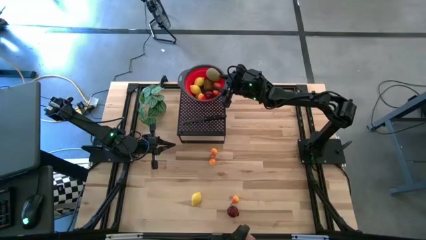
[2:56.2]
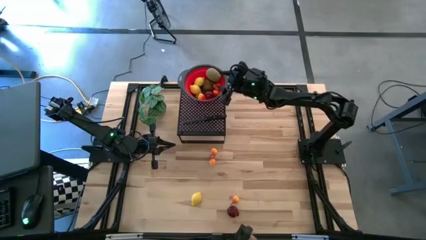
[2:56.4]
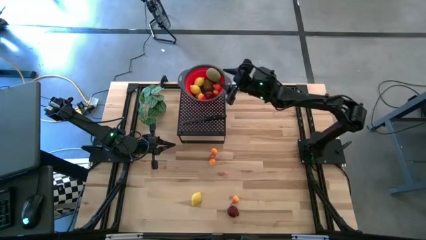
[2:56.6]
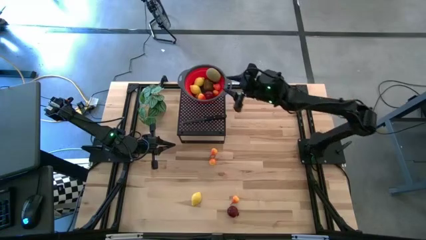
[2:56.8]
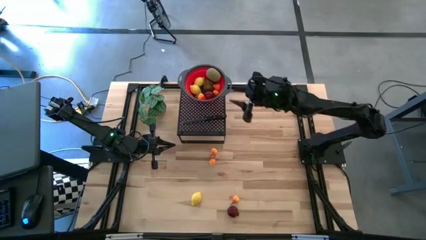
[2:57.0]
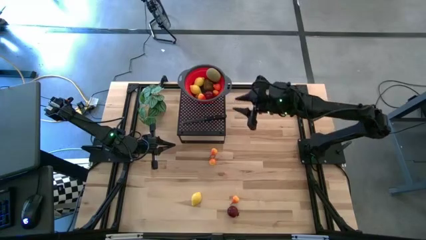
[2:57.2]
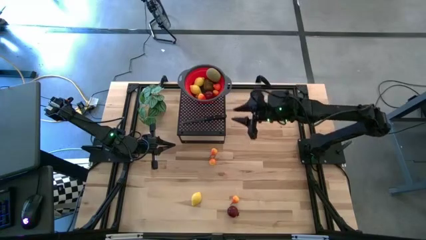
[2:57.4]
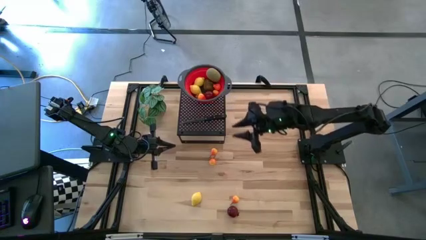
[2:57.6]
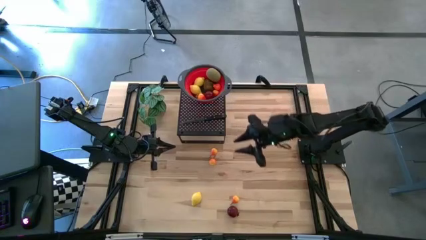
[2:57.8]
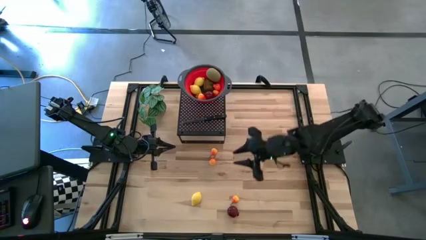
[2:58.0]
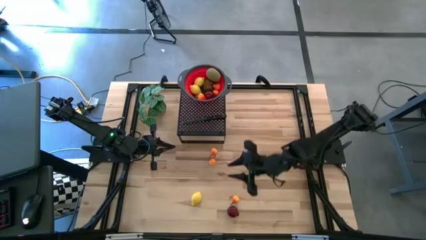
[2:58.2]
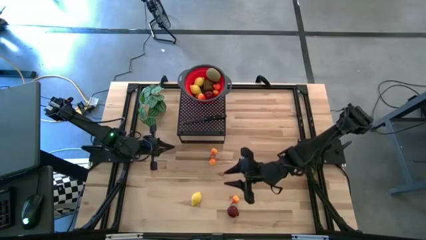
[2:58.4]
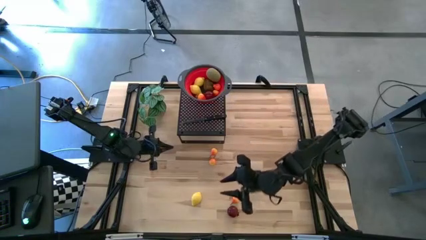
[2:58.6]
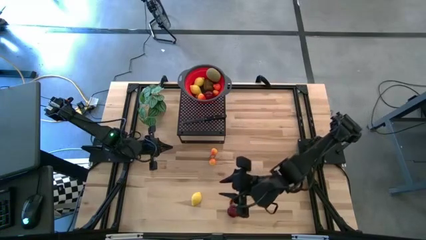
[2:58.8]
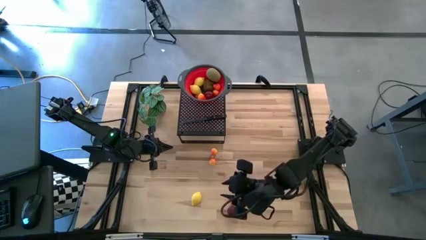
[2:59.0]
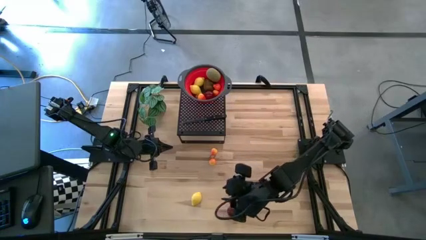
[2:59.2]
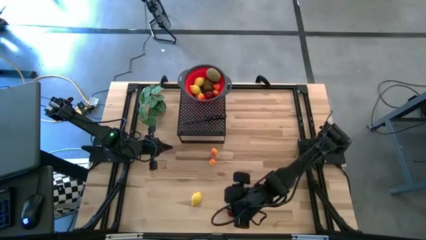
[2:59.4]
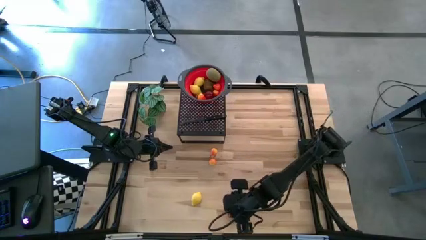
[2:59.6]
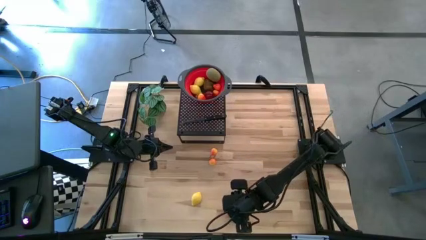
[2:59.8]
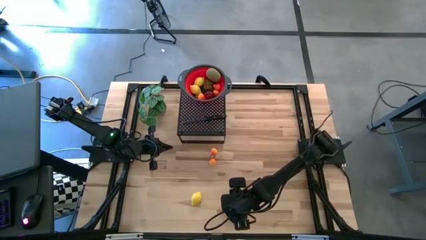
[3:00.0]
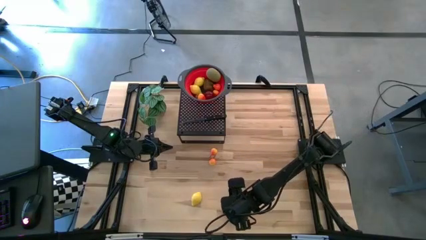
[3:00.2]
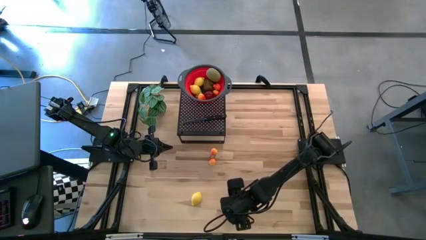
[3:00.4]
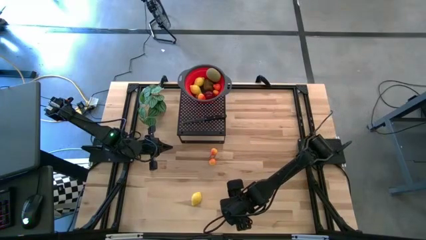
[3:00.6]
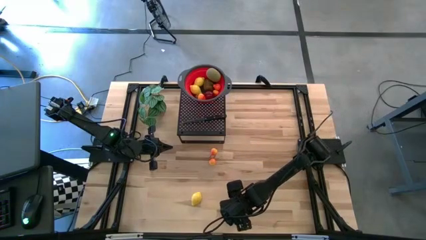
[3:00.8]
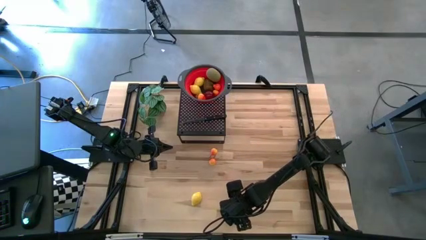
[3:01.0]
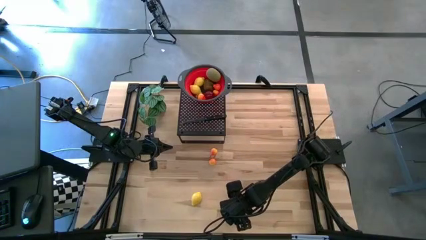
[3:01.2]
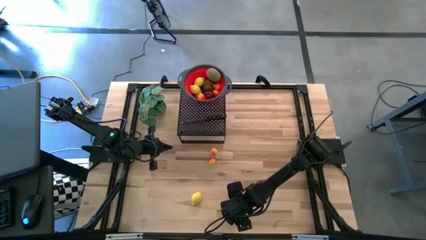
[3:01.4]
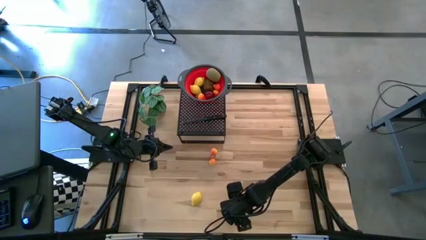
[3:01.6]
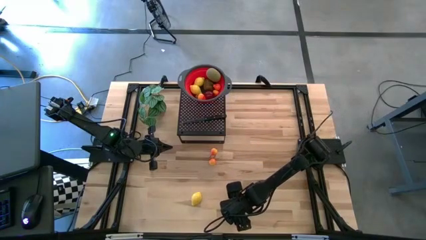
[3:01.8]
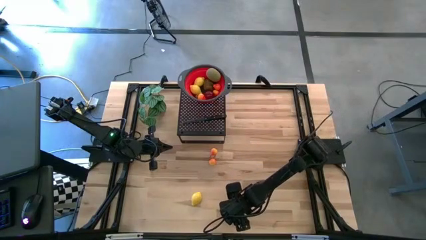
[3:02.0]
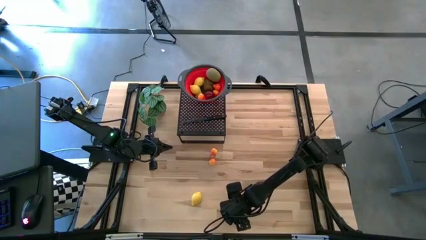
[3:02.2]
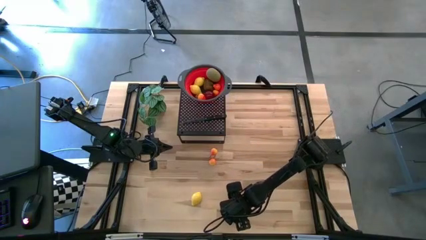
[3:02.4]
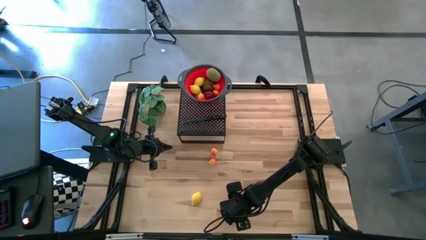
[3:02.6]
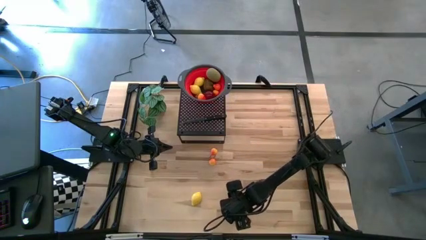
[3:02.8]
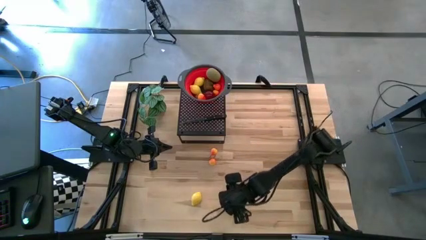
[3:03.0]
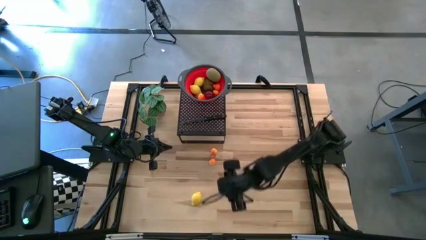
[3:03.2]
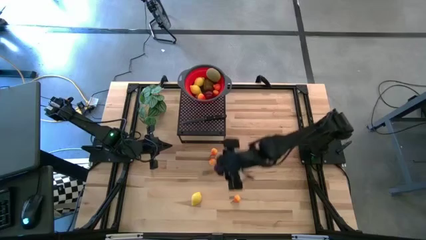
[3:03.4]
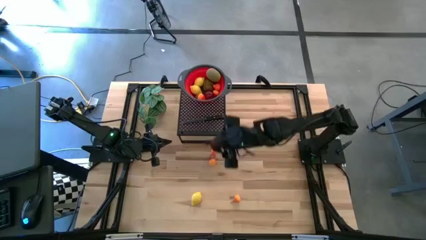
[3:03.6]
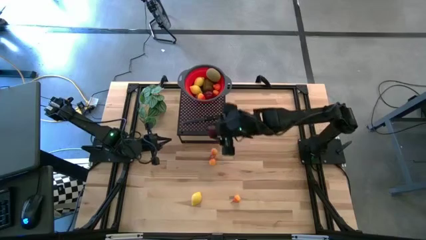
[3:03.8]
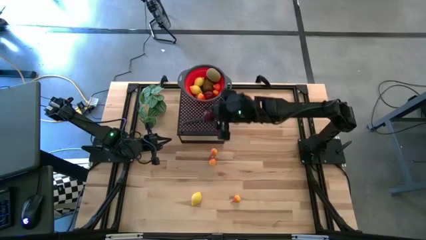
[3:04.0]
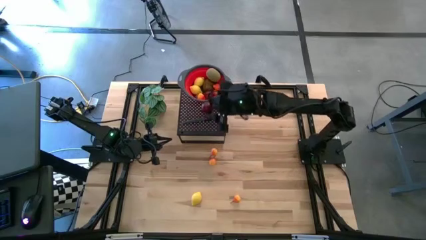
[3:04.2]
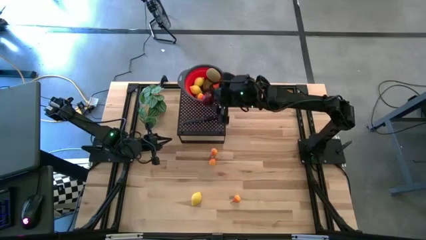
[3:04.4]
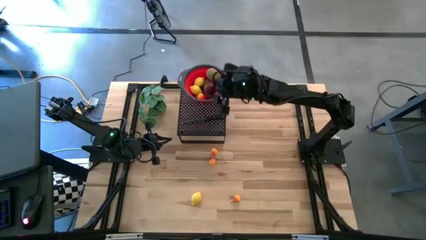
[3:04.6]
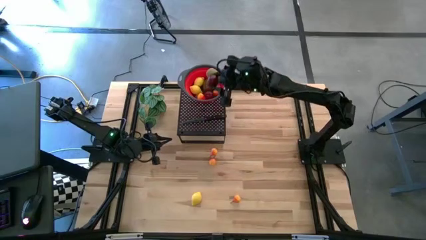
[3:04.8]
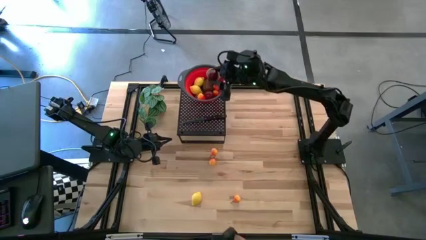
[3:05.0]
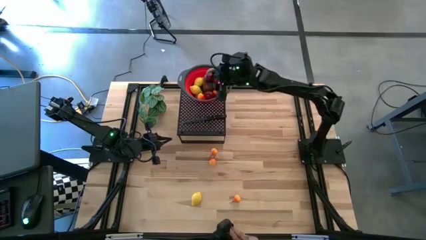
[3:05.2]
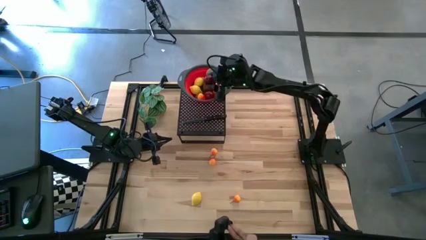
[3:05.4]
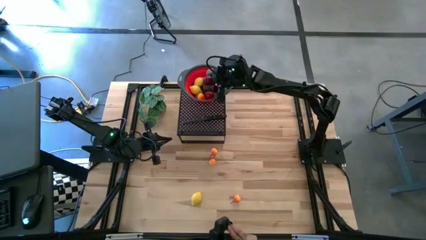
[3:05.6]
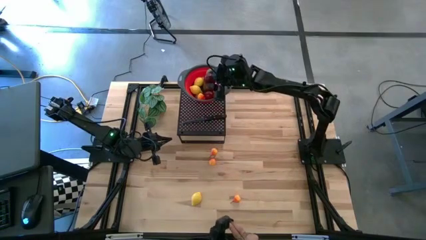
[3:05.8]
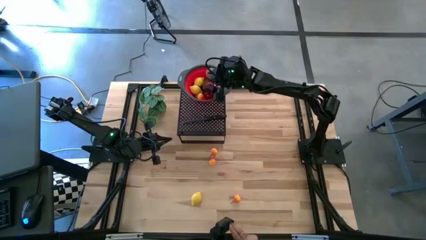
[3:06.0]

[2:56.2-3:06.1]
Task: Pick & Place Fruit
Put the pomegranate into the red strainer bowl

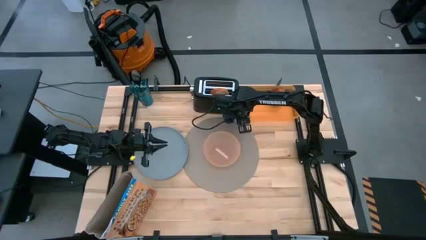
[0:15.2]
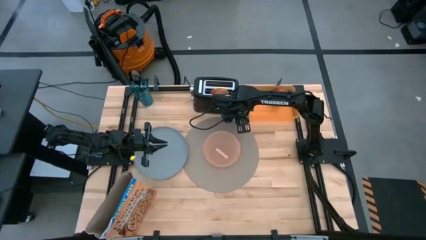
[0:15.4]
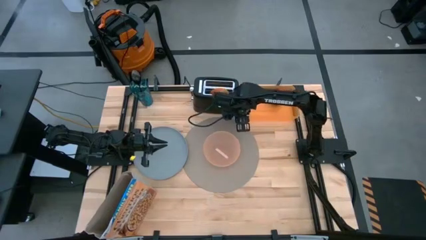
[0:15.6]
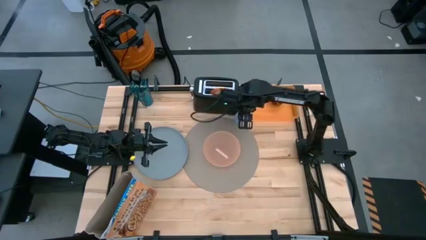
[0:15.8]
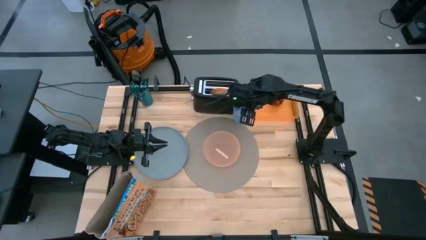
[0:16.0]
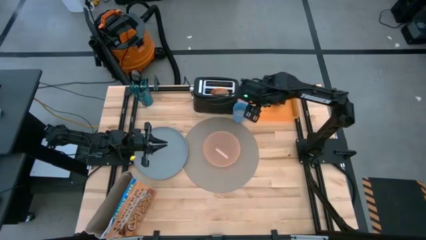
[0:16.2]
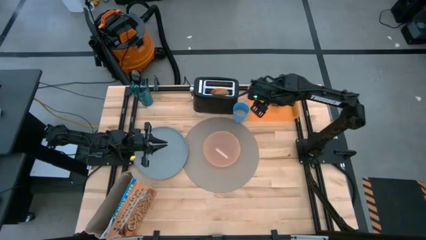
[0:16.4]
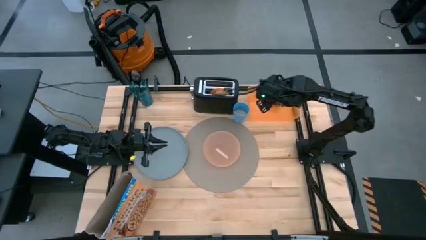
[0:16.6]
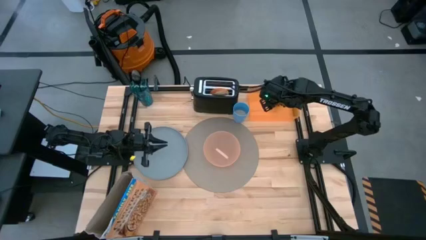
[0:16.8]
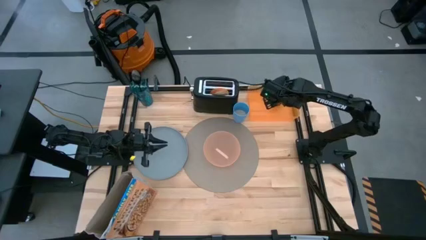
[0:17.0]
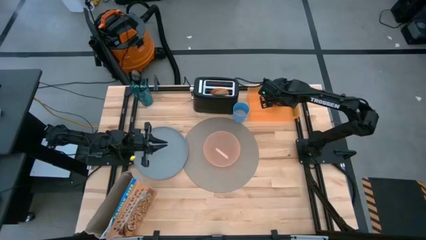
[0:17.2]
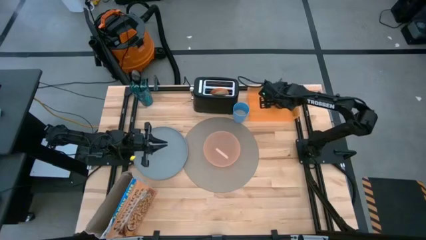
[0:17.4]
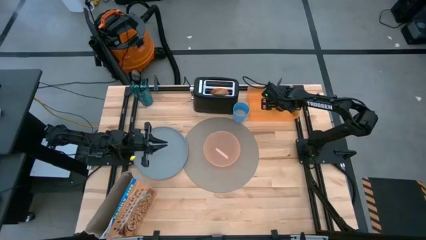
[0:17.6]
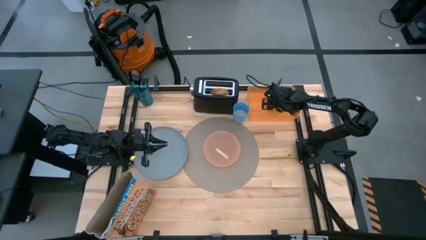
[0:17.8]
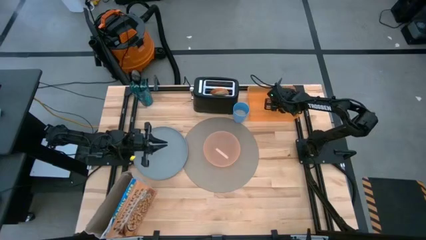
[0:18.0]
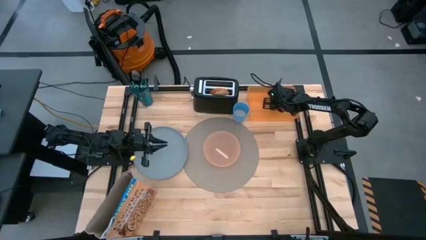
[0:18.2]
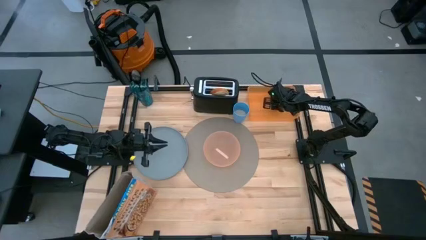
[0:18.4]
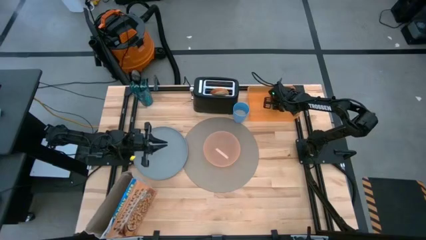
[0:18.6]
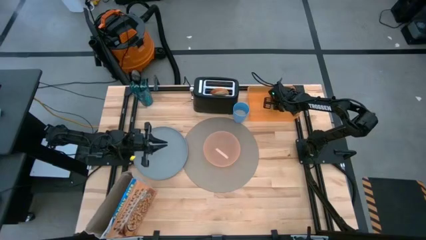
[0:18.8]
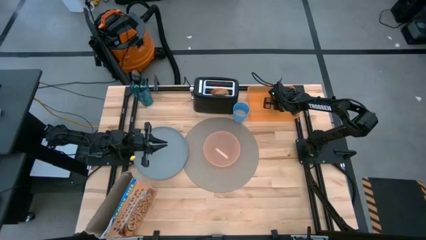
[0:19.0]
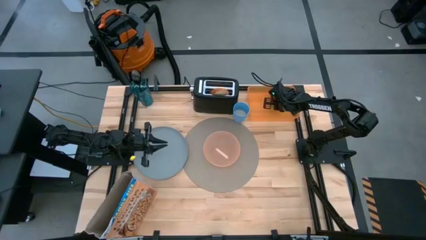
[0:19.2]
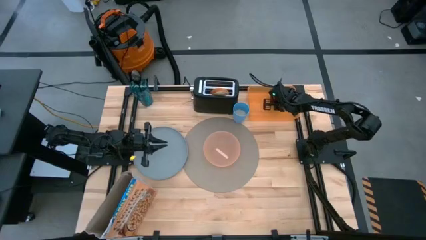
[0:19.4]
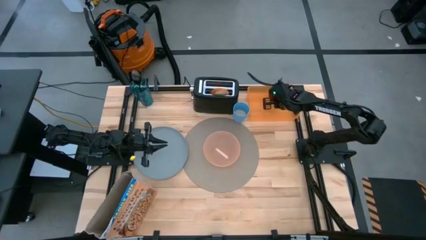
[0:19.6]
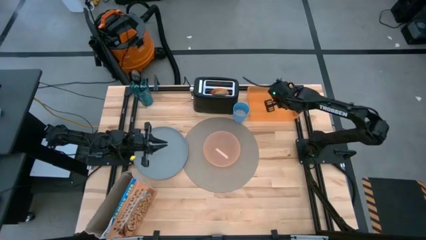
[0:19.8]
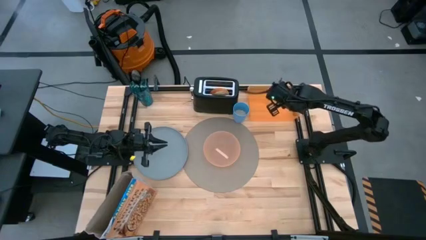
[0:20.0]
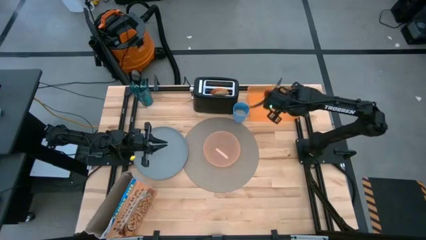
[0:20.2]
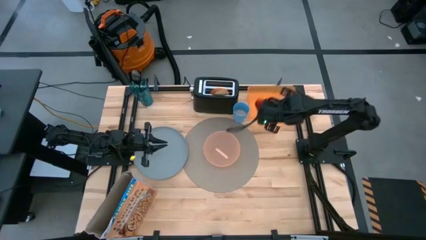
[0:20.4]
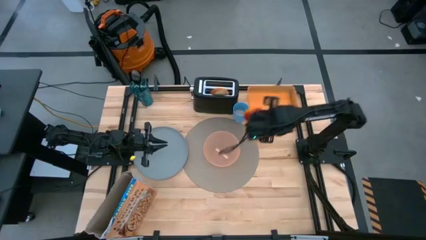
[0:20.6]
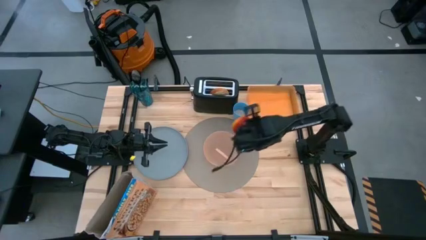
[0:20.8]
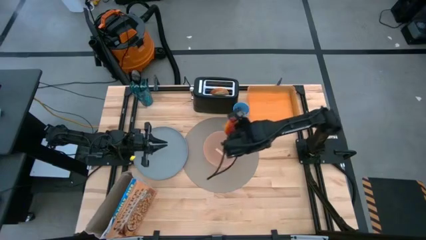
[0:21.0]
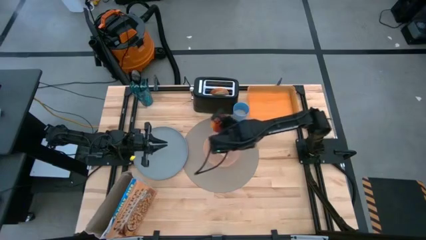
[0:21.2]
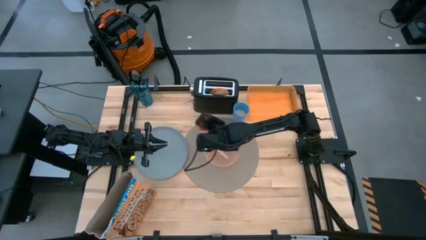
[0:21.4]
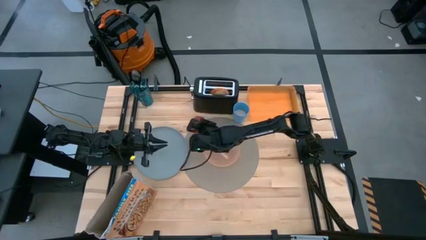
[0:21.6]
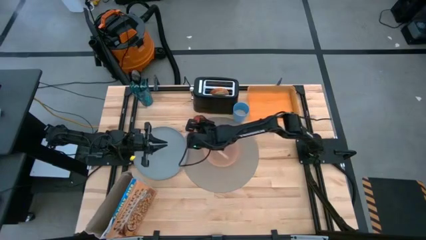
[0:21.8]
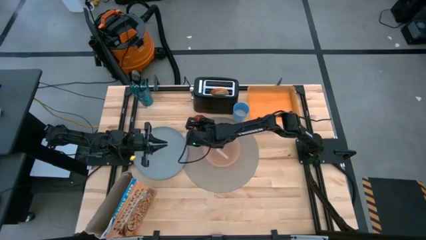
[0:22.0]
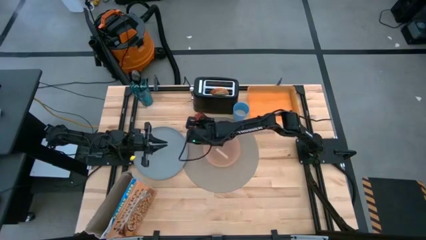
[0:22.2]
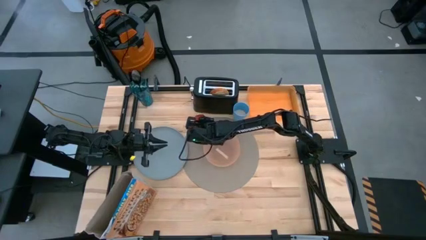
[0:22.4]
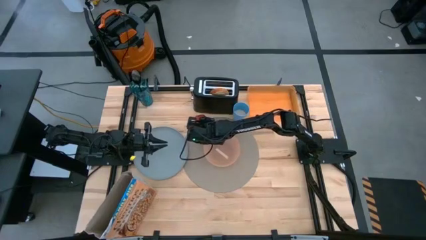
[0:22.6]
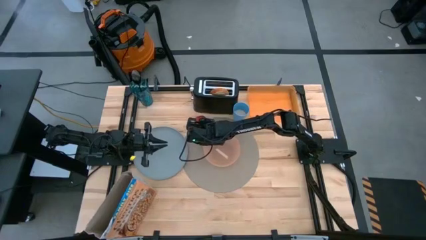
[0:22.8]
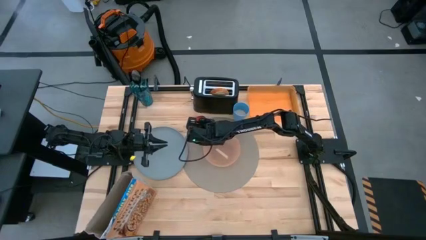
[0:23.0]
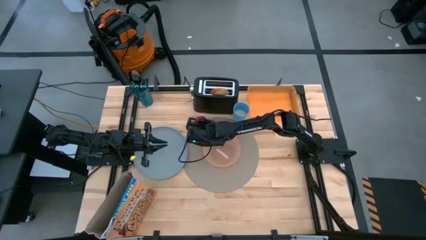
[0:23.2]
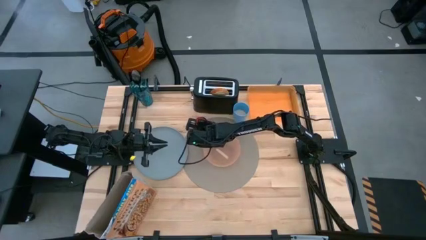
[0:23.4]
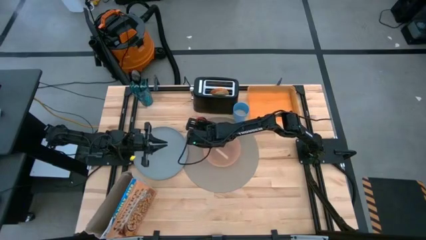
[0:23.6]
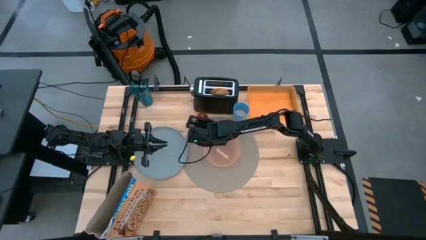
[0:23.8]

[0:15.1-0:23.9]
Task: Arrange a breakfast setting
Put the apple to the top left of the gray placemat
